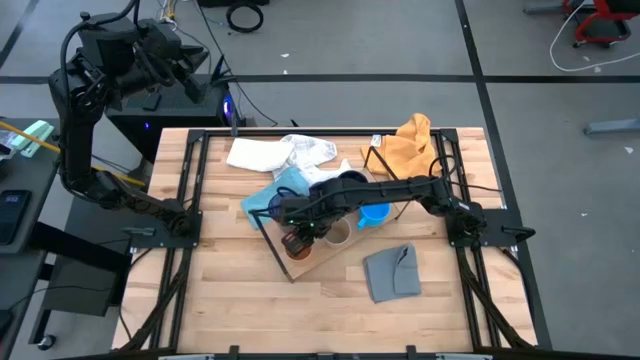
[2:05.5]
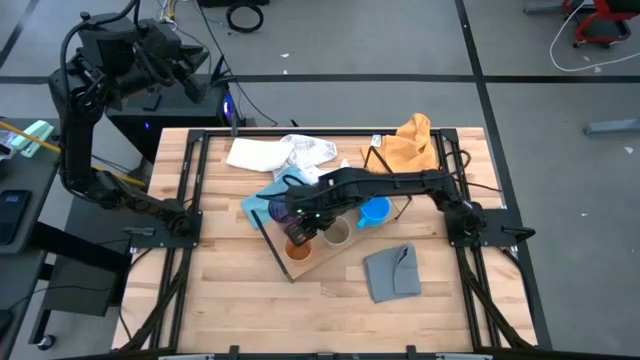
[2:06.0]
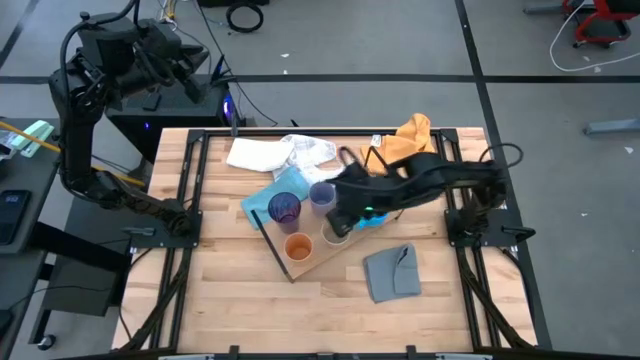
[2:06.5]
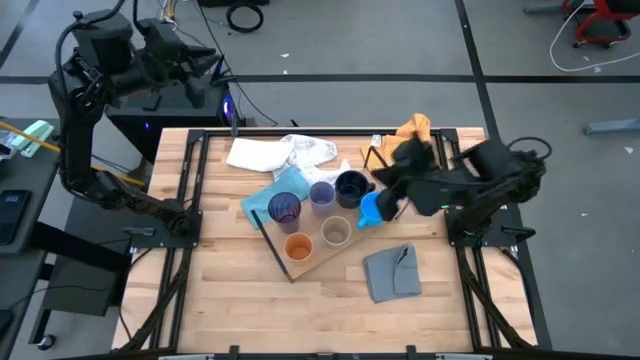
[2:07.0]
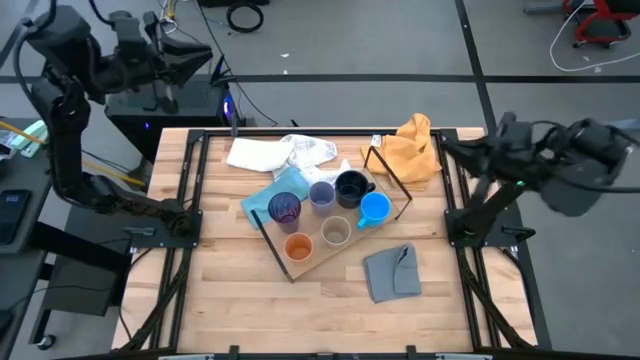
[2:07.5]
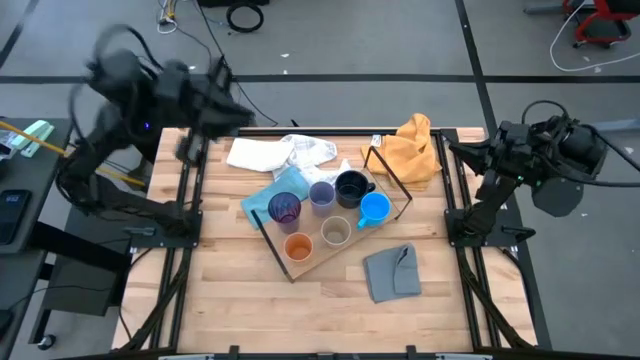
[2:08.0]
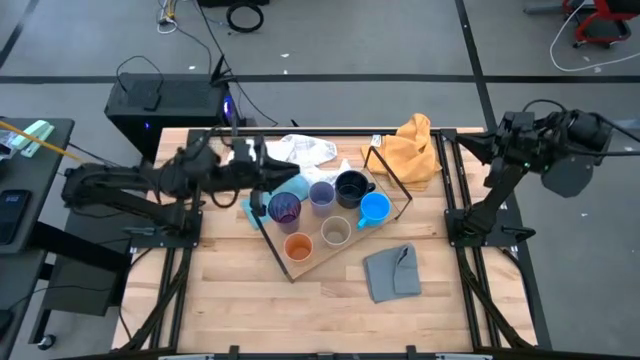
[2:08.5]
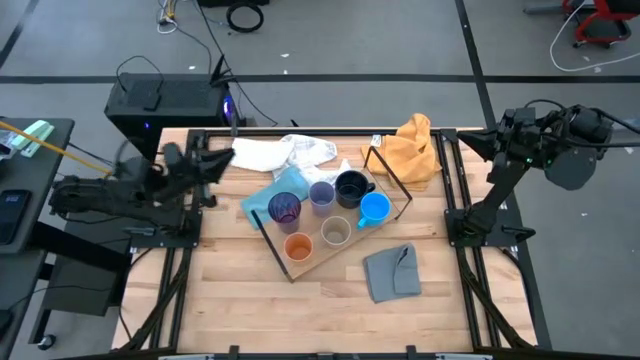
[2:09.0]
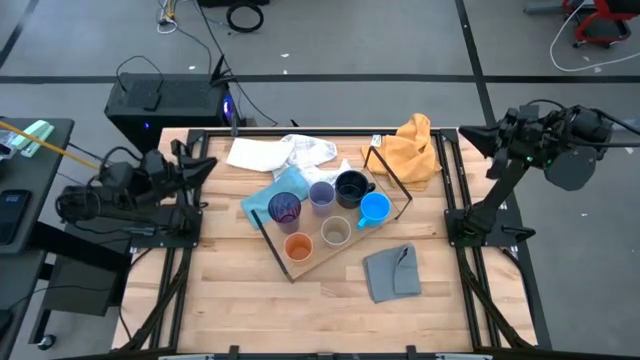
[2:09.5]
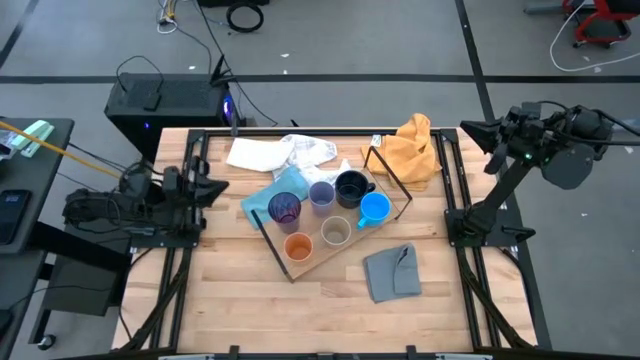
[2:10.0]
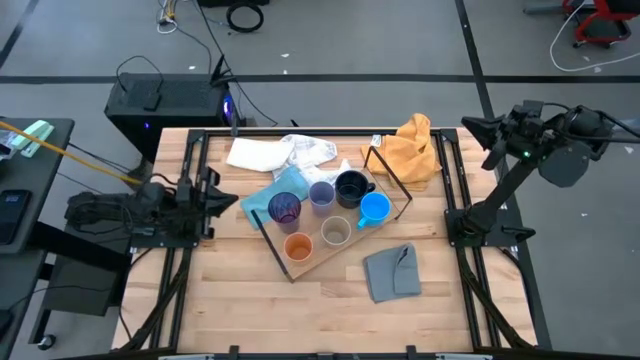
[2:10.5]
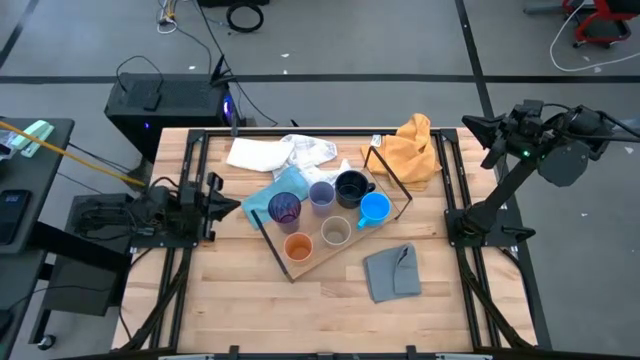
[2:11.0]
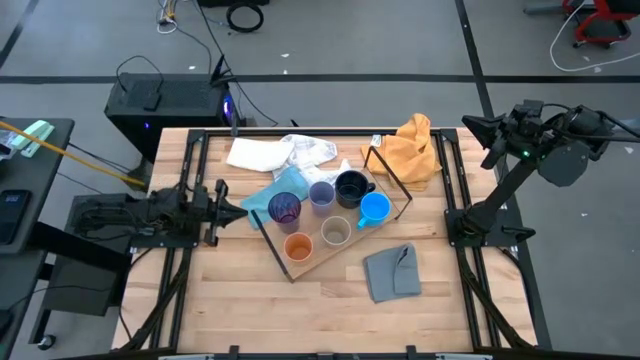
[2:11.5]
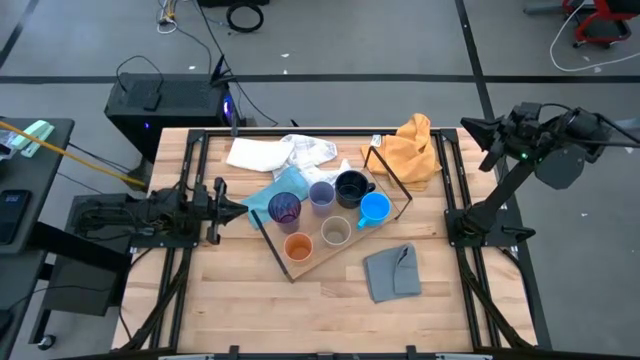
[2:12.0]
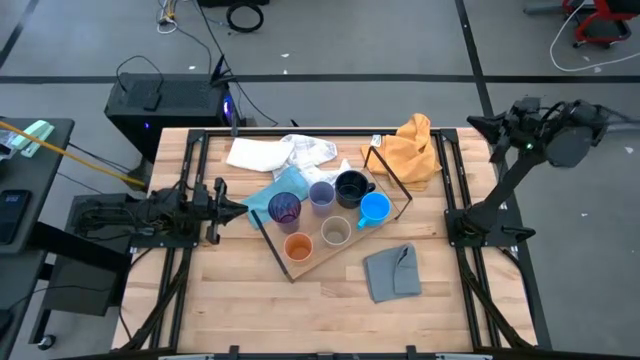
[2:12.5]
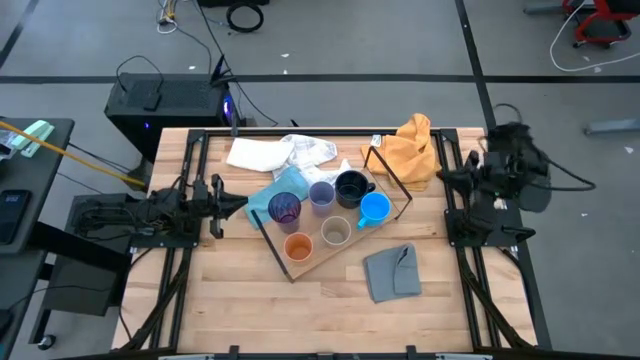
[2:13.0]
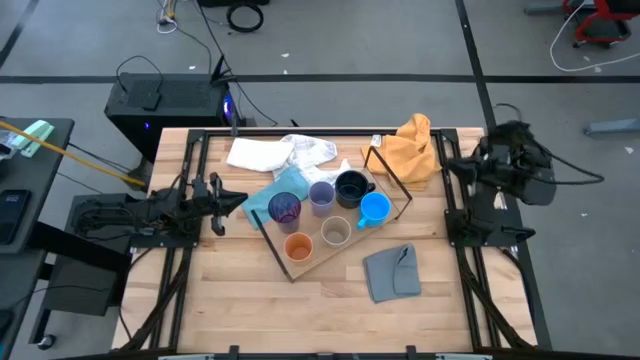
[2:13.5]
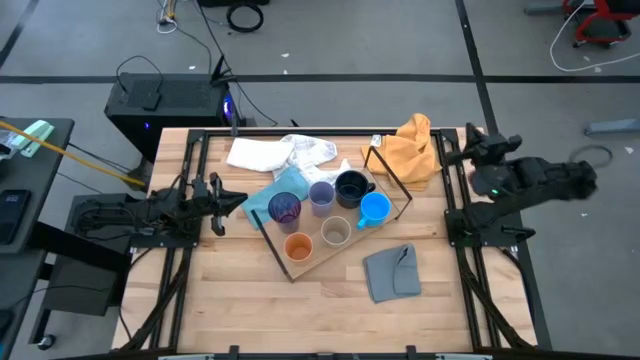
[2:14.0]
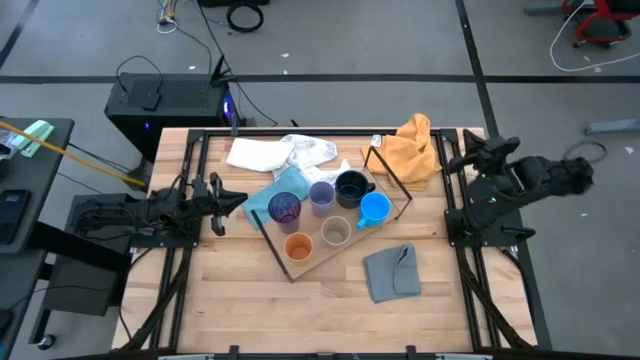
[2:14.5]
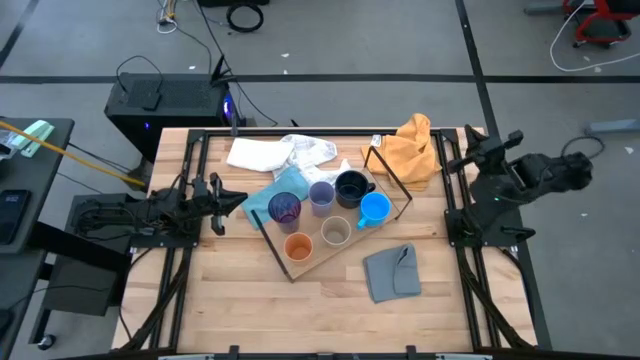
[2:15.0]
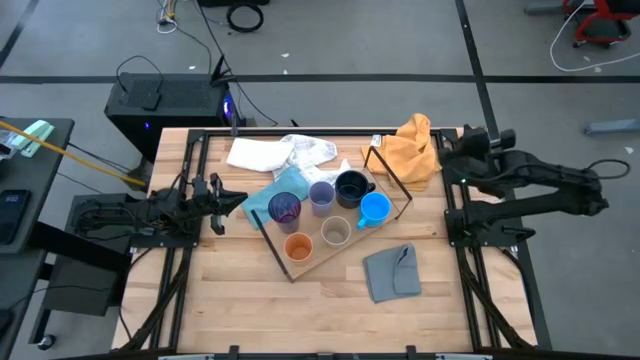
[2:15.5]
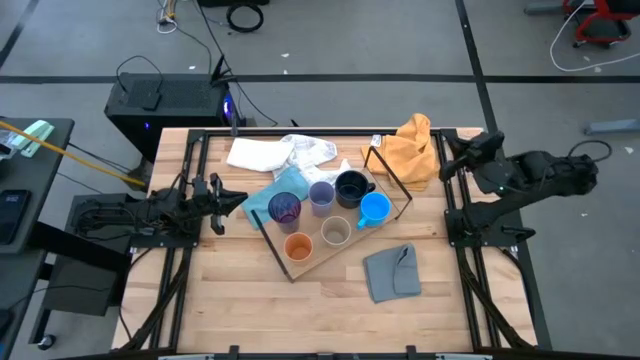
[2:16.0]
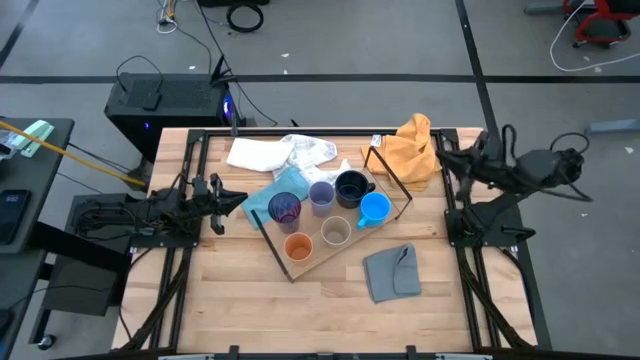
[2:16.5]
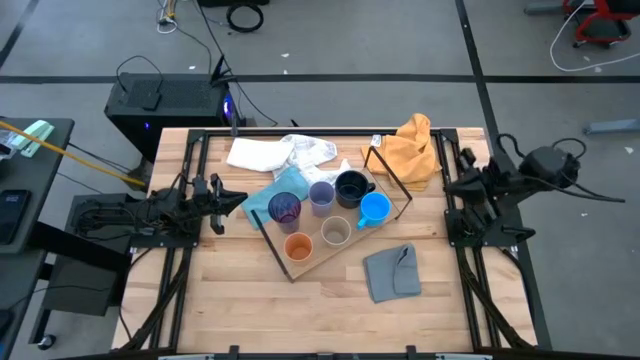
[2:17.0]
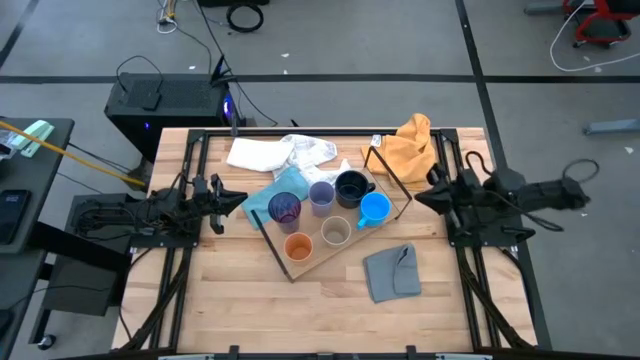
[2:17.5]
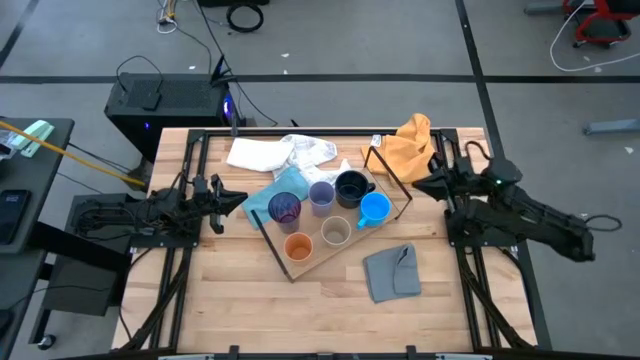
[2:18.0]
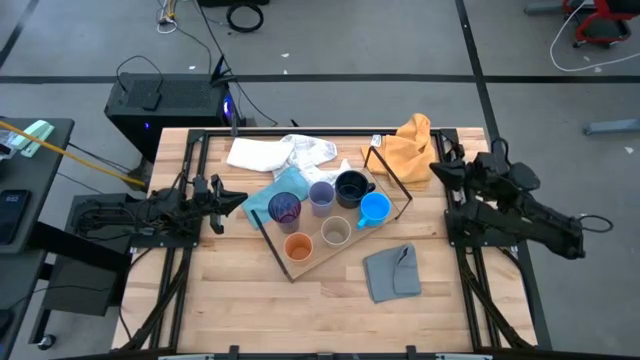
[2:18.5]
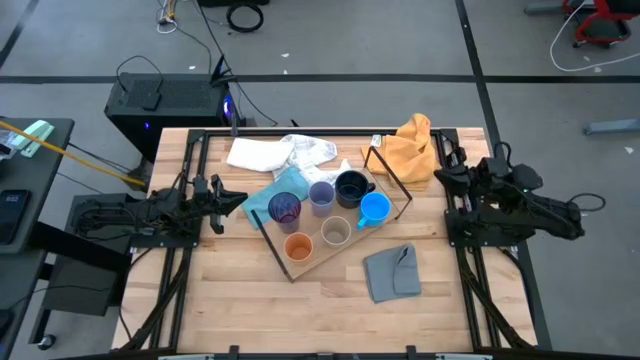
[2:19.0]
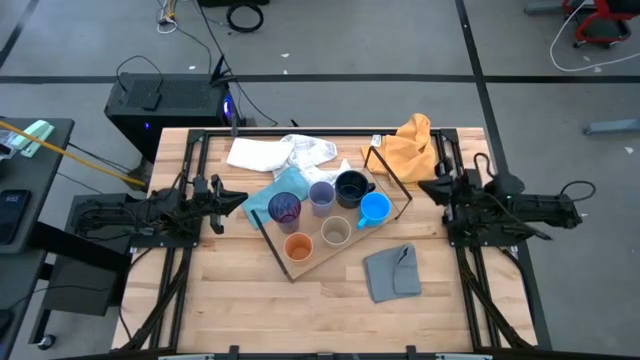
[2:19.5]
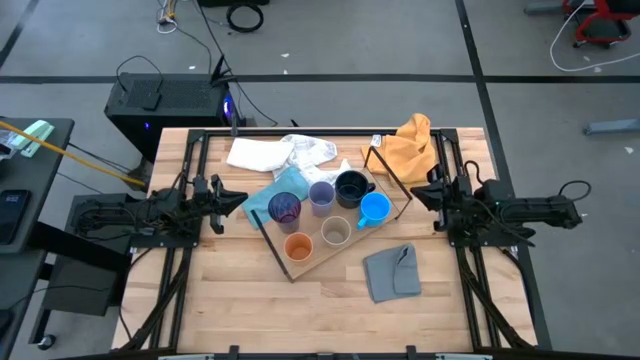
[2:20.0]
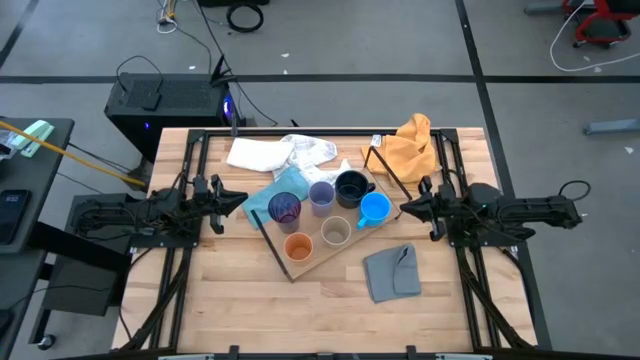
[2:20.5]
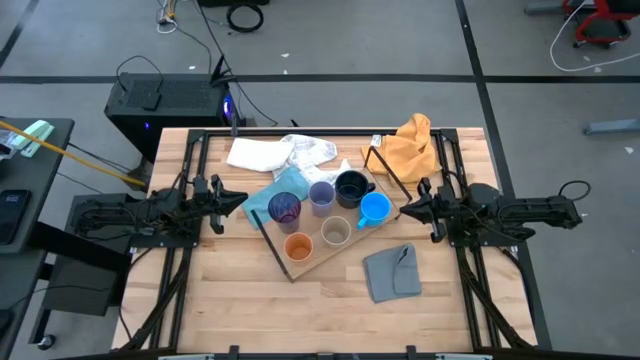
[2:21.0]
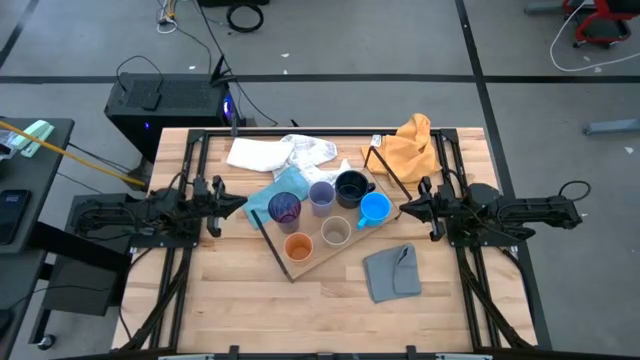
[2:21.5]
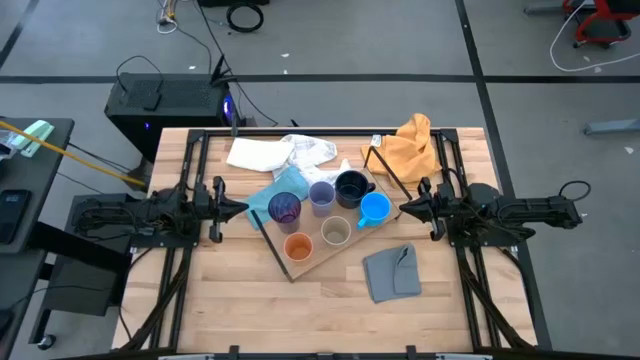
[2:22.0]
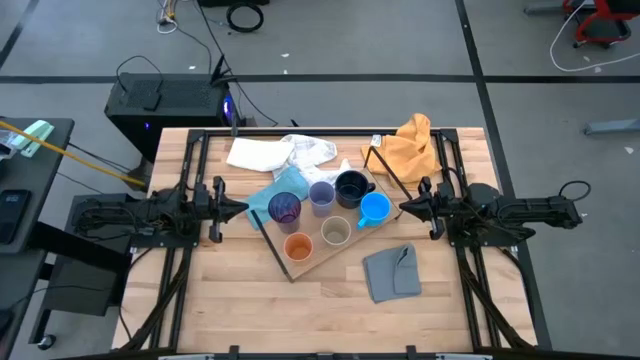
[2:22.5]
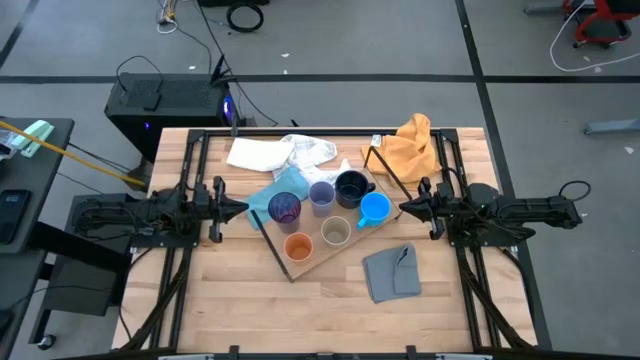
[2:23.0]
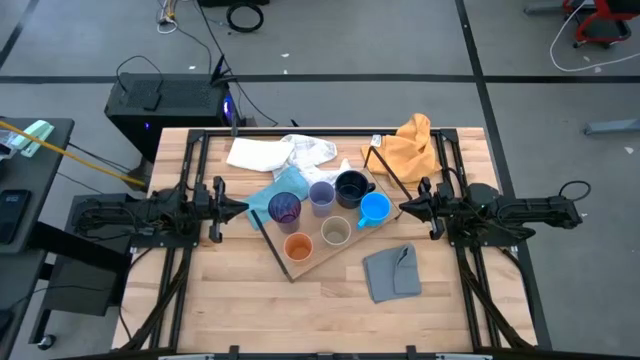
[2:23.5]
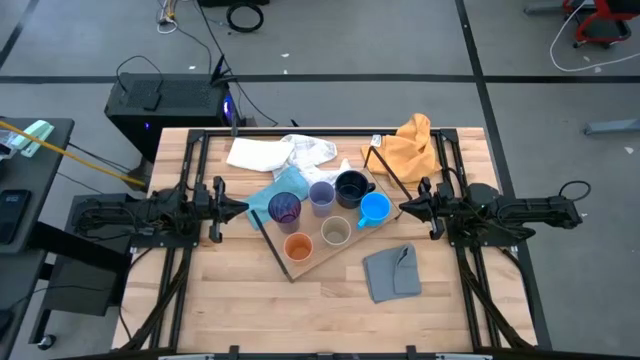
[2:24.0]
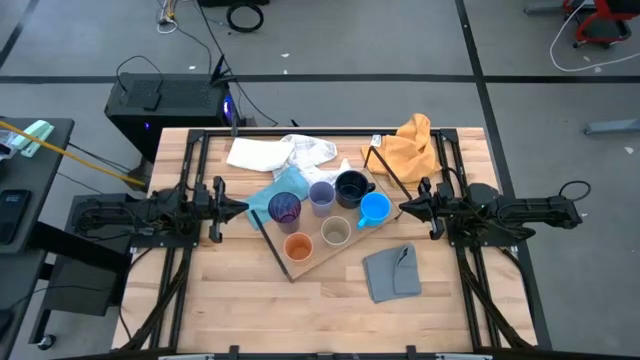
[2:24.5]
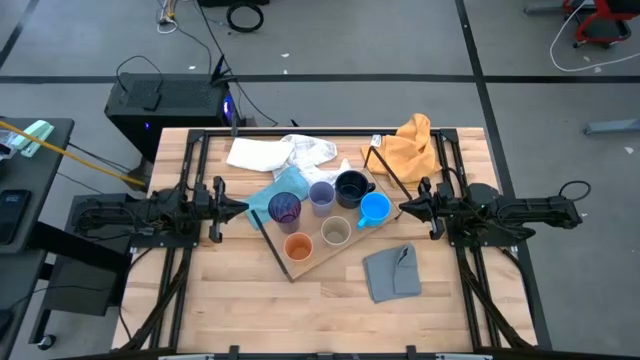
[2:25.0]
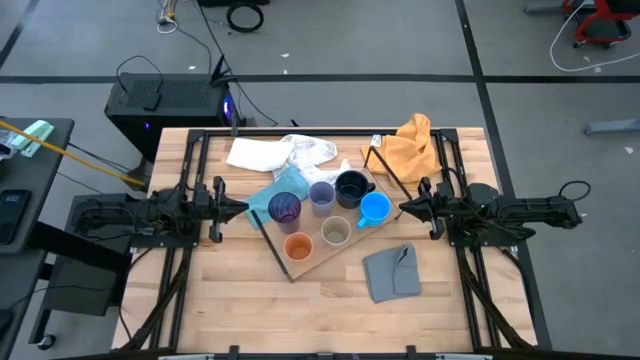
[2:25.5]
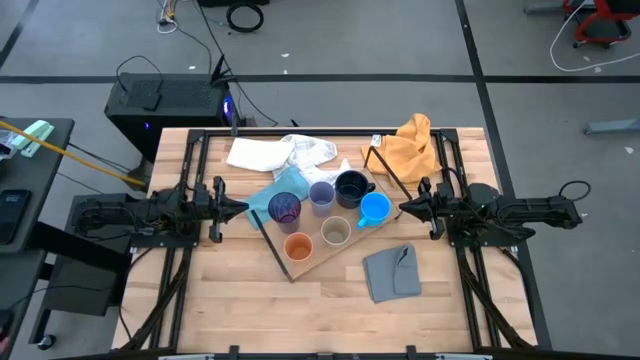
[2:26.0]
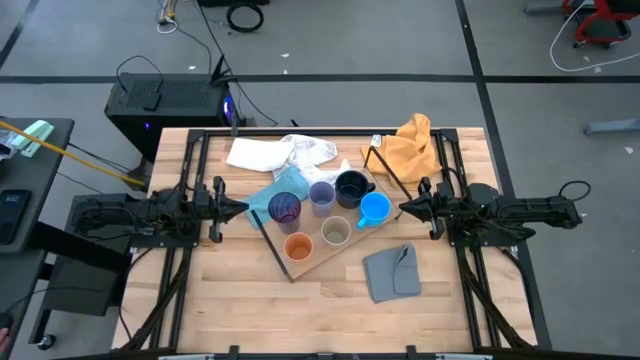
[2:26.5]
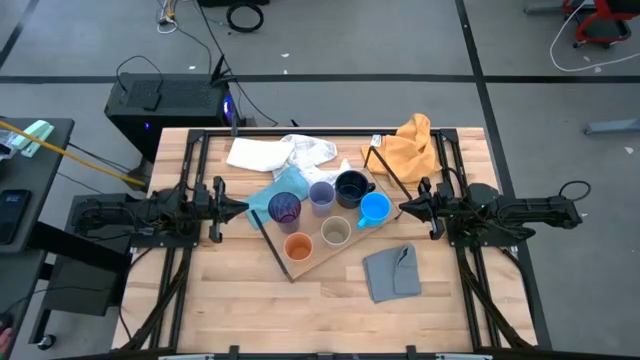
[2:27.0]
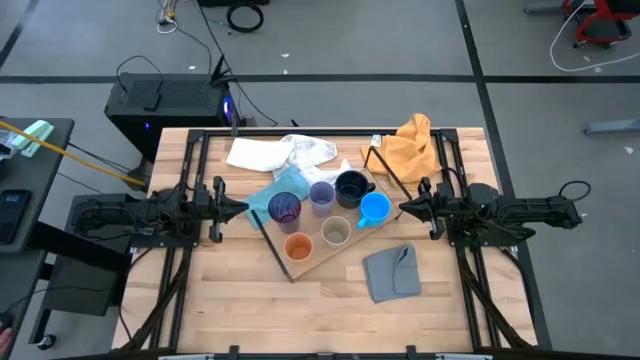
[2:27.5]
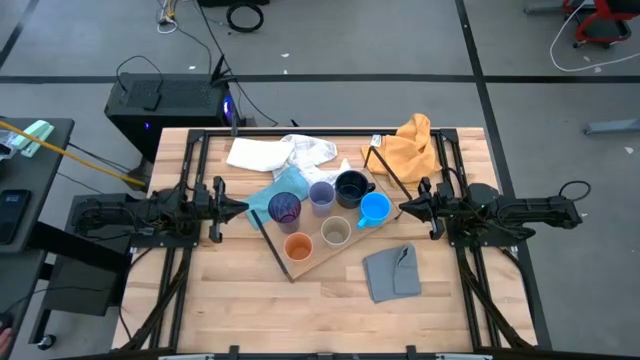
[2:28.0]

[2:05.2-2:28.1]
Task: Stack small to large cups/mugs on shelf
Return to Home Position
